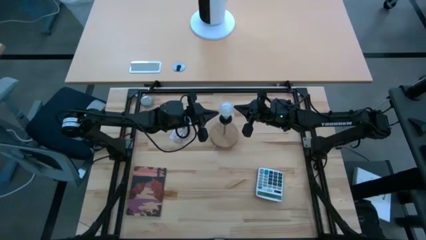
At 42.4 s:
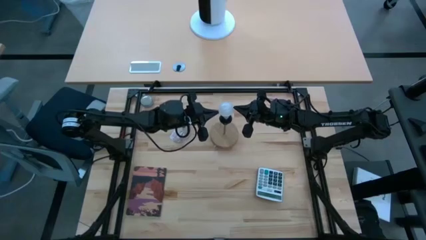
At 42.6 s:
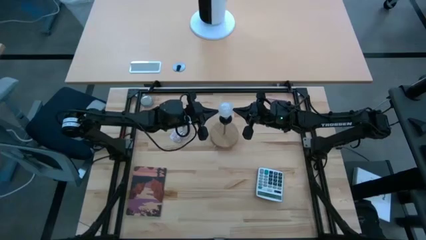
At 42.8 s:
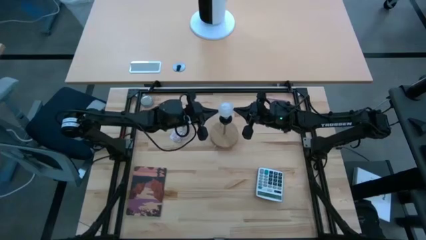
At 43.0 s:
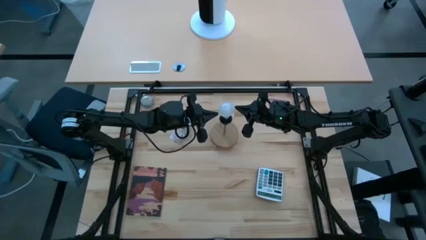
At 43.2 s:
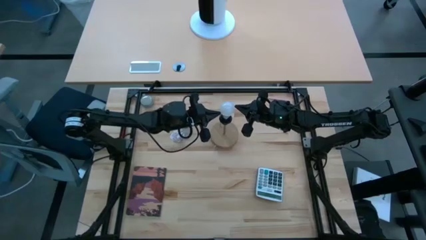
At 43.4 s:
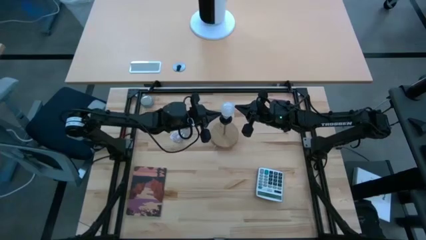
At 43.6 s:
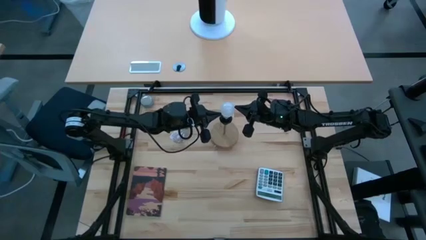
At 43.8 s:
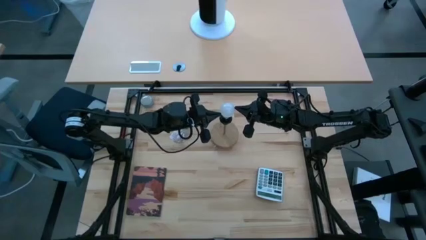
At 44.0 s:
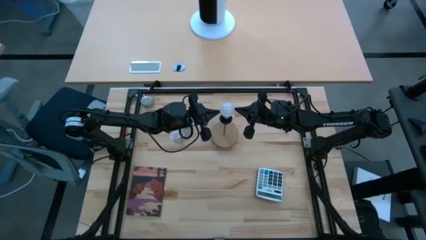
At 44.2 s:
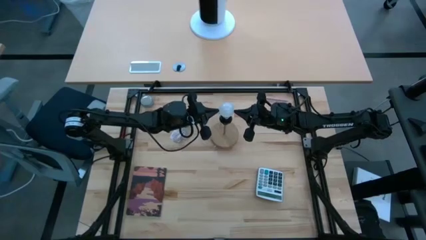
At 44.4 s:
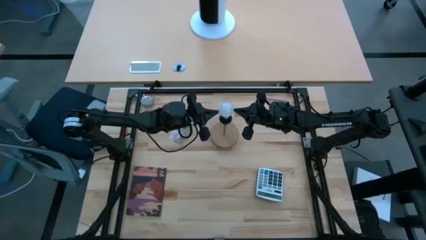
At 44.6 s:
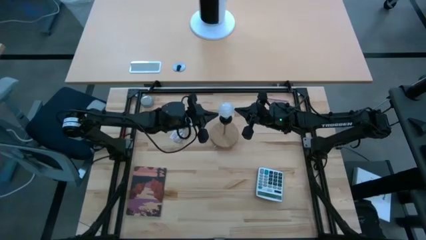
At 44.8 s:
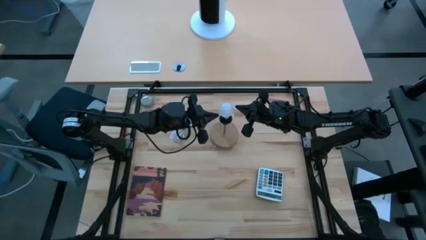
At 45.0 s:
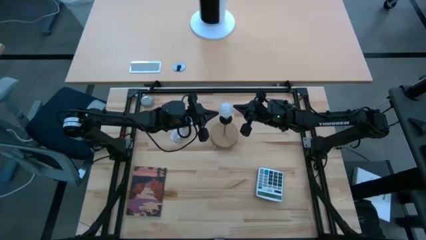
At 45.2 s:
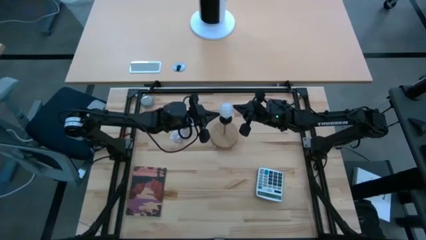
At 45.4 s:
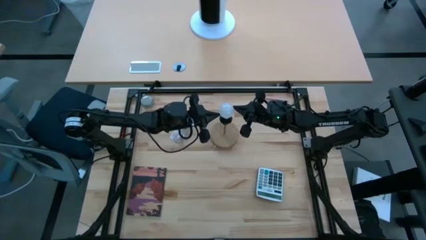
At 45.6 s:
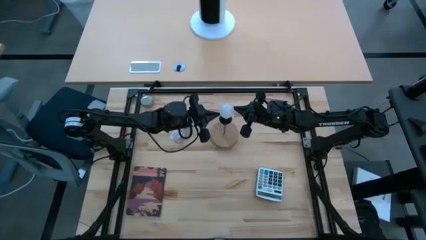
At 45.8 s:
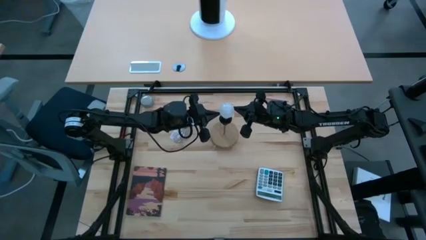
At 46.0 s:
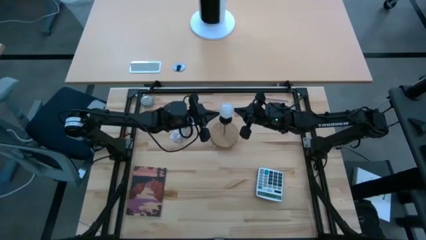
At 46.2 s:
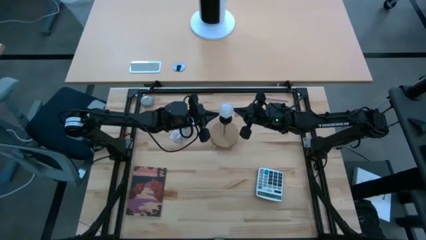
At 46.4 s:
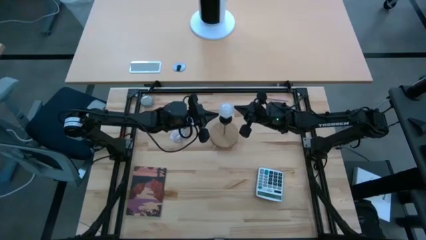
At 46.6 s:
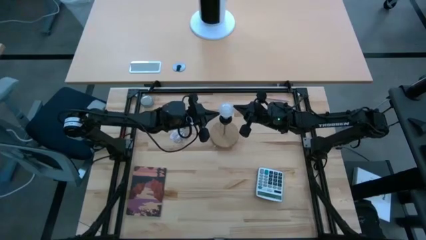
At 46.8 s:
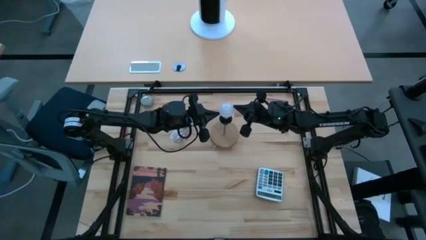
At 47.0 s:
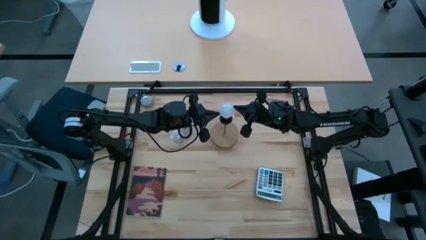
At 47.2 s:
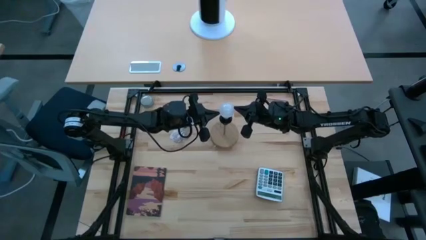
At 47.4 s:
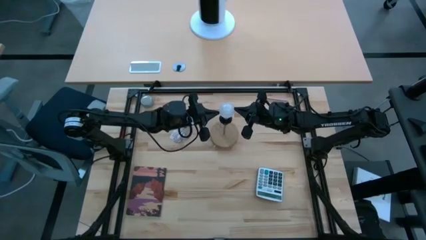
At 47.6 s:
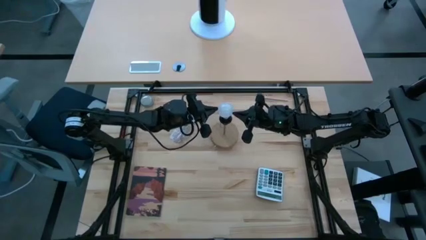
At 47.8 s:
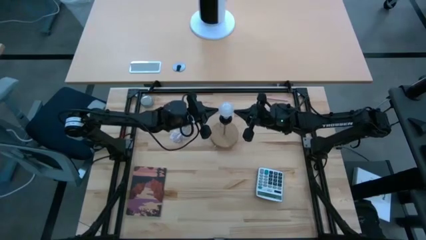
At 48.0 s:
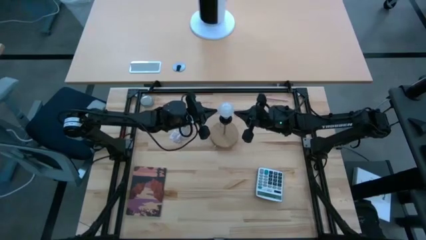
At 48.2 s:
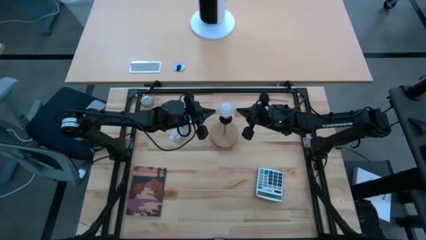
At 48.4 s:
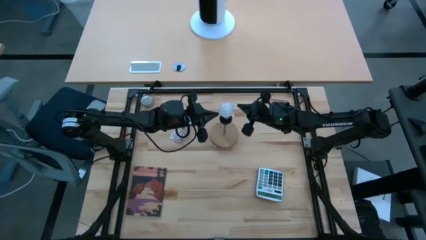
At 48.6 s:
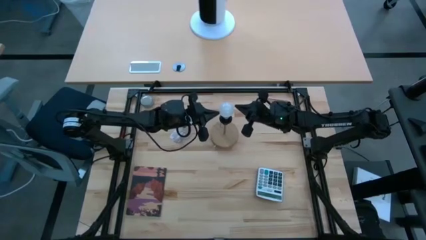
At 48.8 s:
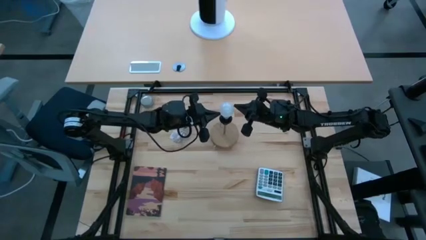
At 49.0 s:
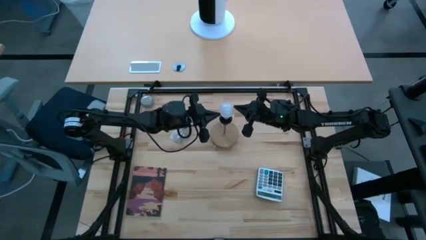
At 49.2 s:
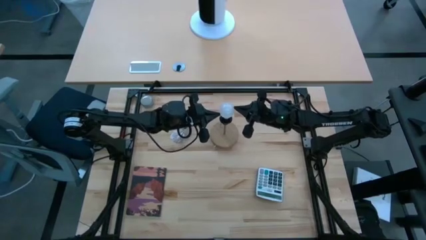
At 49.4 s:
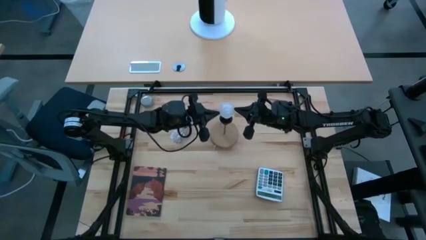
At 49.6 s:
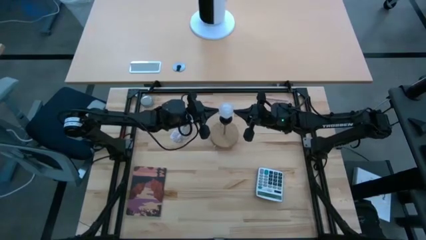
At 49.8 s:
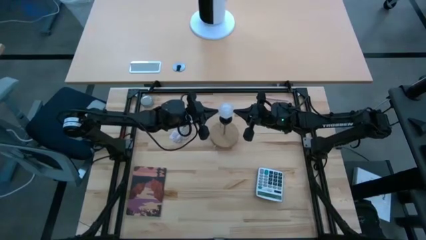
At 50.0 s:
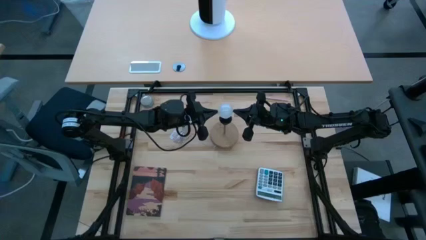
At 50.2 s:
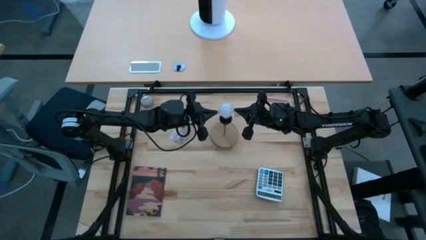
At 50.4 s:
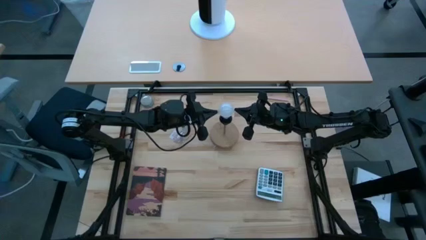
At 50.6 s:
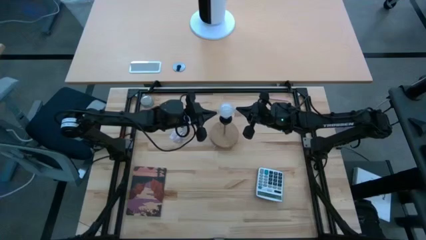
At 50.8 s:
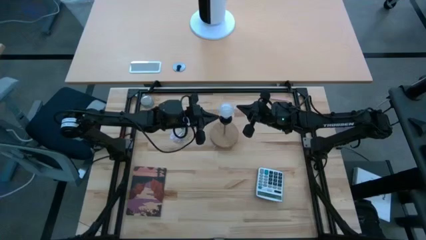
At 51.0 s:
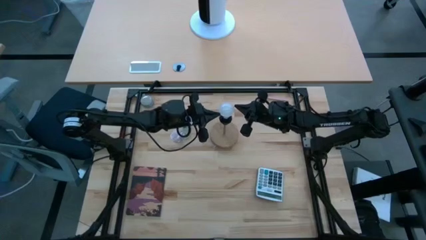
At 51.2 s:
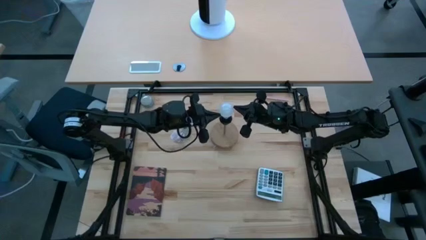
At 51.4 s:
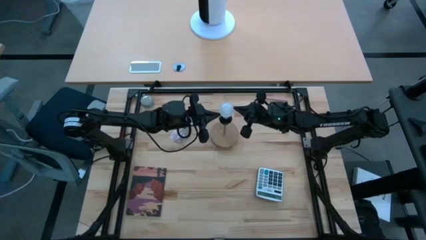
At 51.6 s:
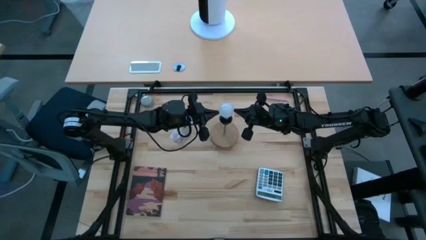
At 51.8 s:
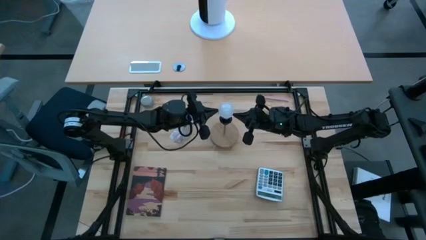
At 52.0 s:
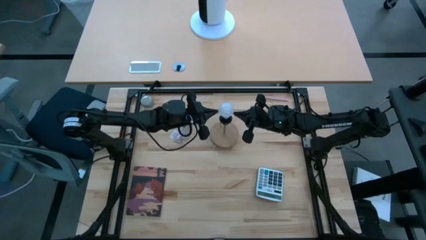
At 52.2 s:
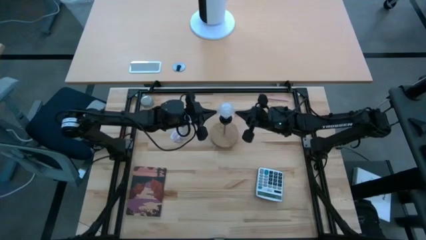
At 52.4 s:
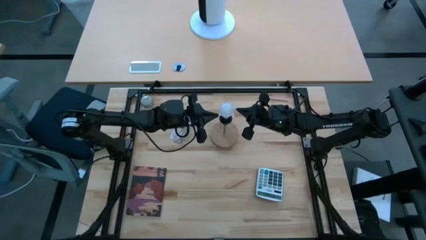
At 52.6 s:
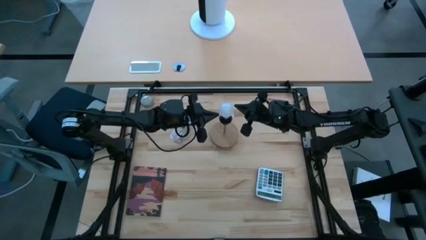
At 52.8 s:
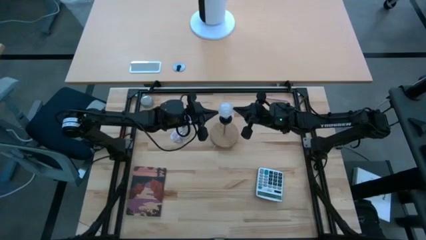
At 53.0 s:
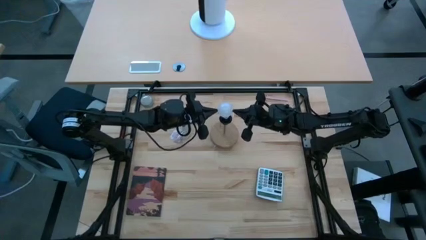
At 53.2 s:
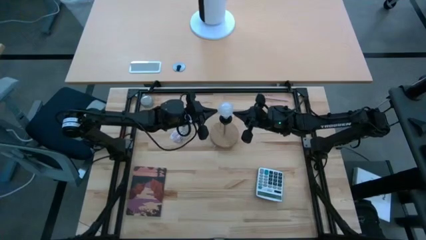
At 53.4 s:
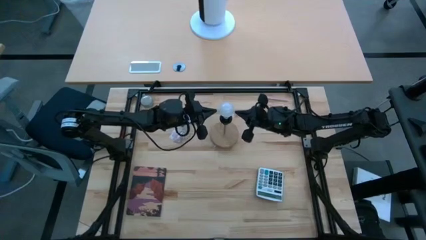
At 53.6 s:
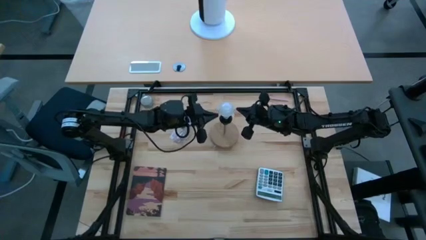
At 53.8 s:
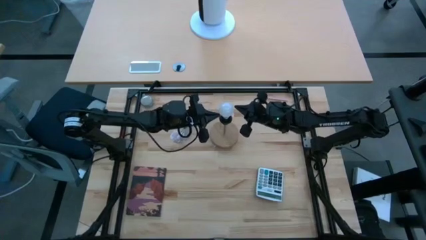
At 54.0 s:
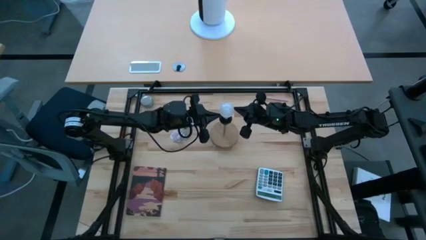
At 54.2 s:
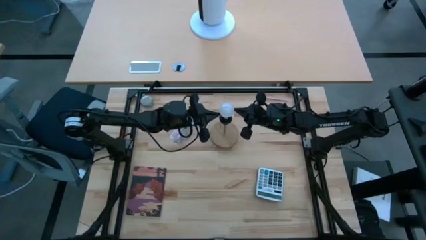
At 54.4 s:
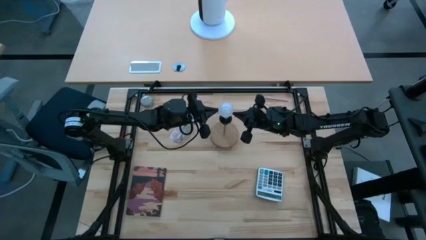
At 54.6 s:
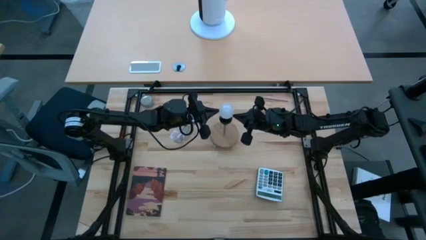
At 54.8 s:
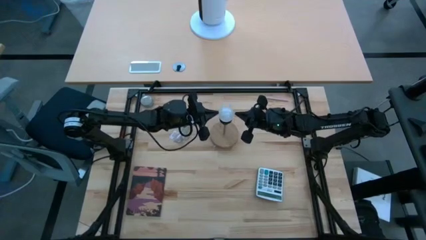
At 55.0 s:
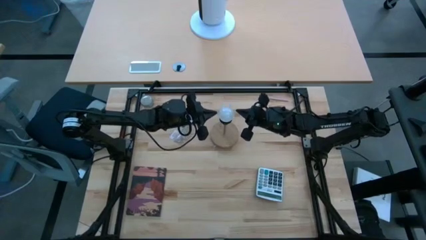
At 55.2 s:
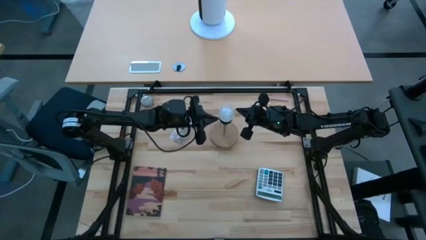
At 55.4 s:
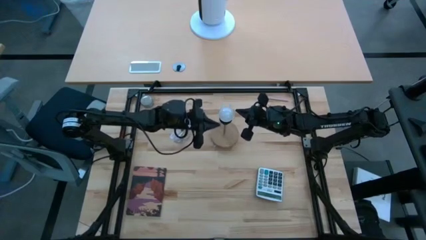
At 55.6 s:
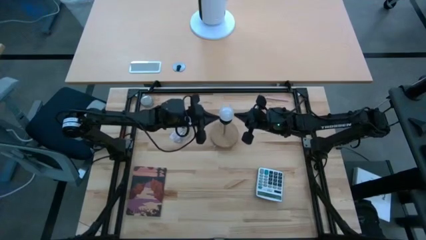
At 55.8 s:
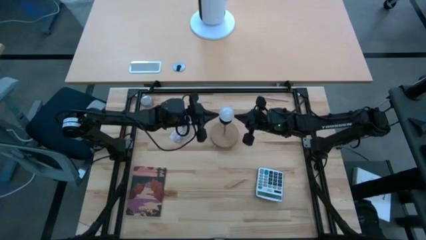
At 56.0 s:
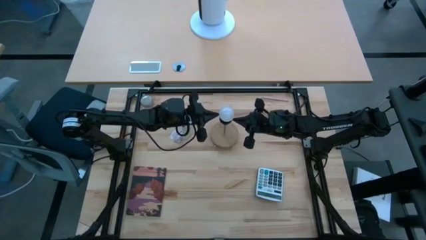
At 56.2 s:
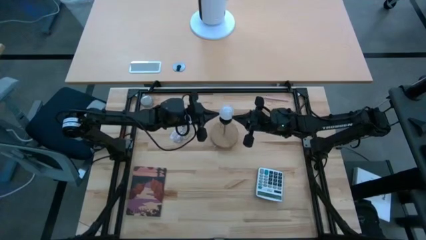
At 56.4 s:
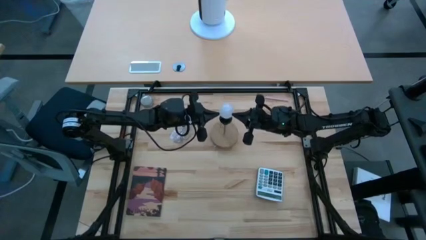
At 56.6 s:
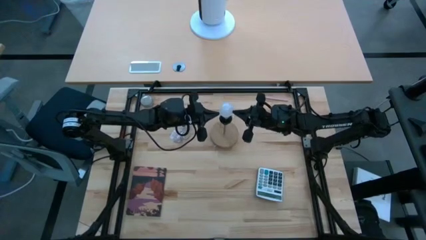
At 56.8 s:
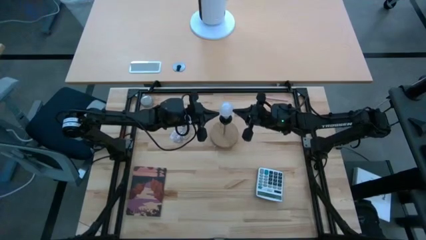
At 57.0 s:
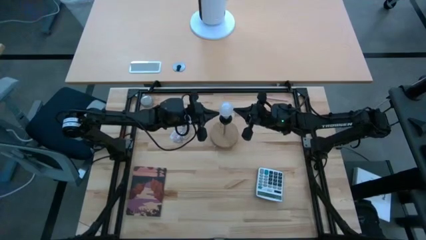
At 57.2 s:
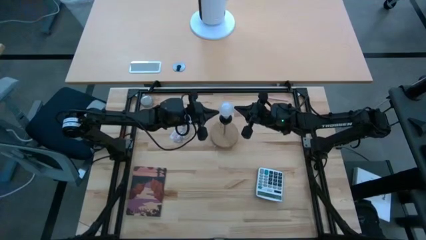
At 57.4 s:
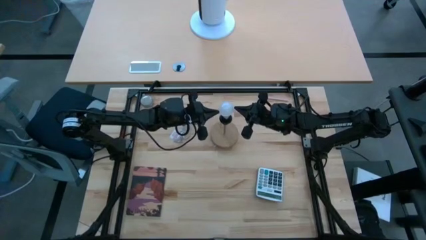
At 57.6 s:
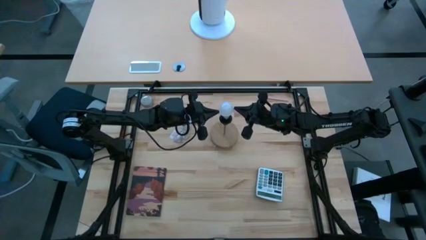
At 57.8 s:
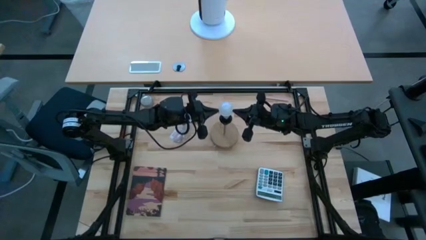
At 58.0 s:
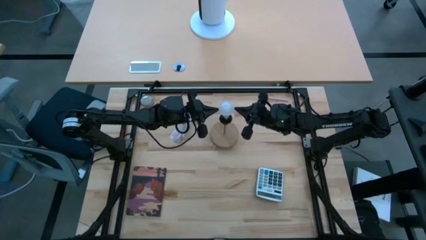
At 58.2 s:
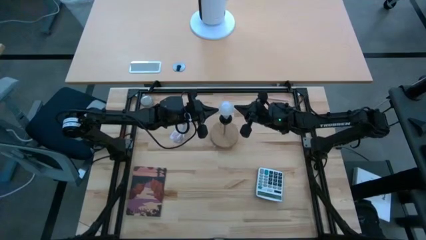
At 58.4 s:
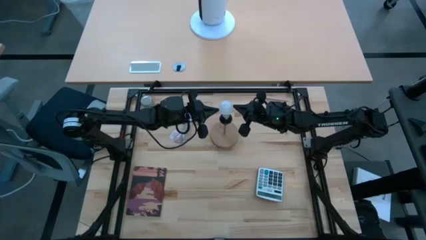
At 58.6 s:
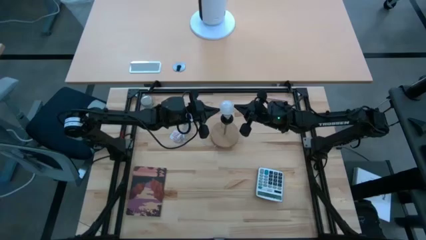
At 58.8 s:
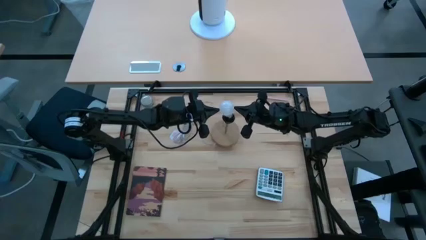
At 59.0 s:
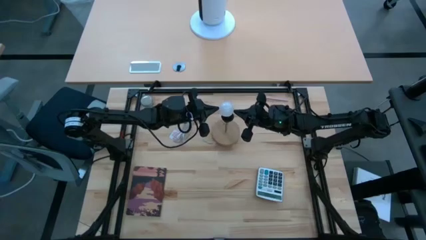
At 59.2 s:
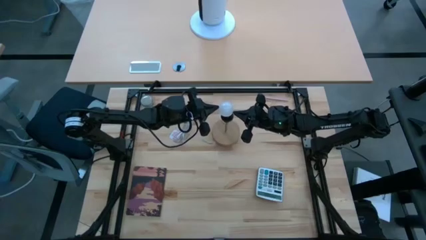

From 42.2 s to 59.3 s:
Task: Screw lightbulb
Insert the lightbulb into the lamp
